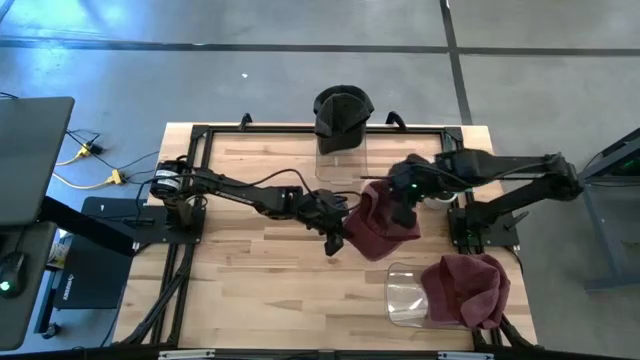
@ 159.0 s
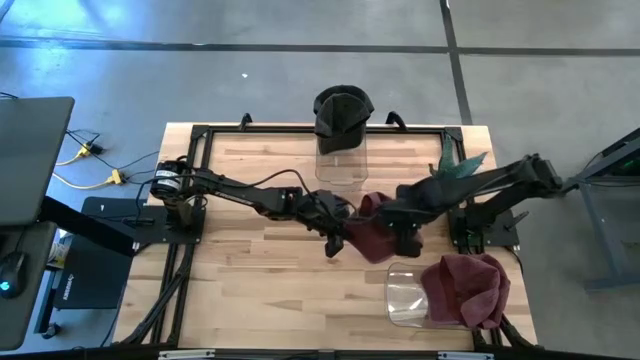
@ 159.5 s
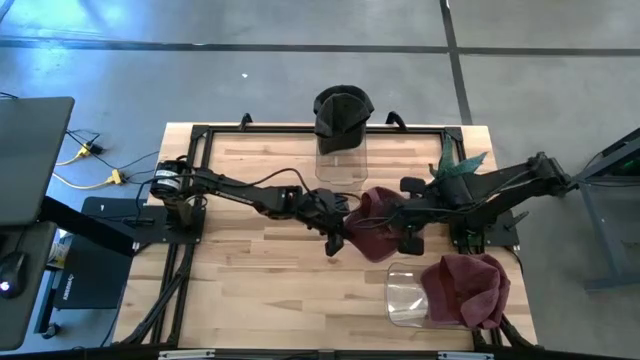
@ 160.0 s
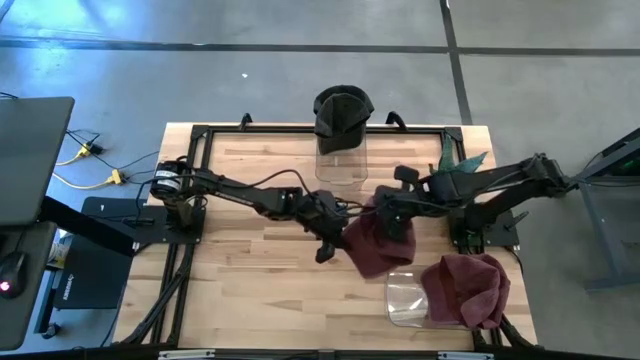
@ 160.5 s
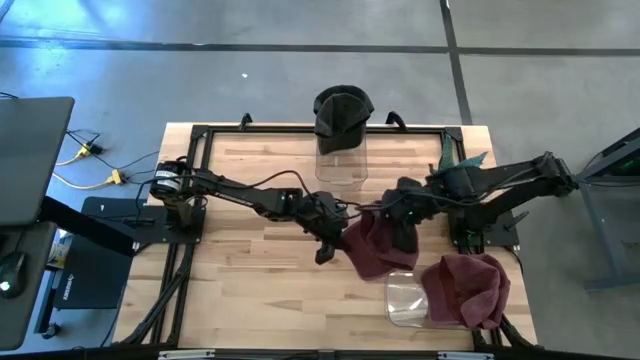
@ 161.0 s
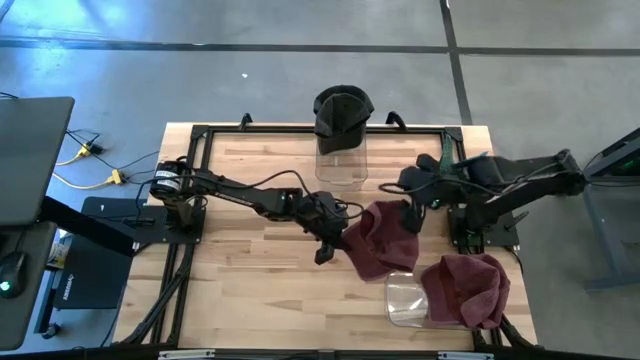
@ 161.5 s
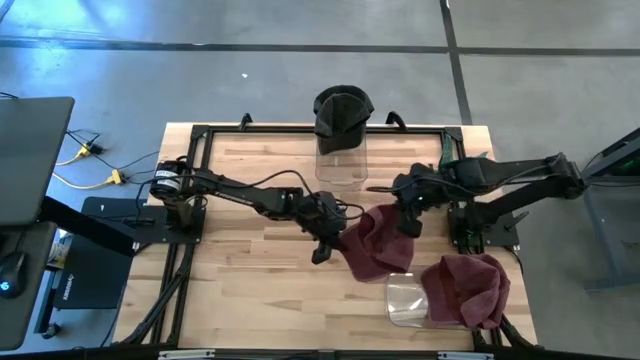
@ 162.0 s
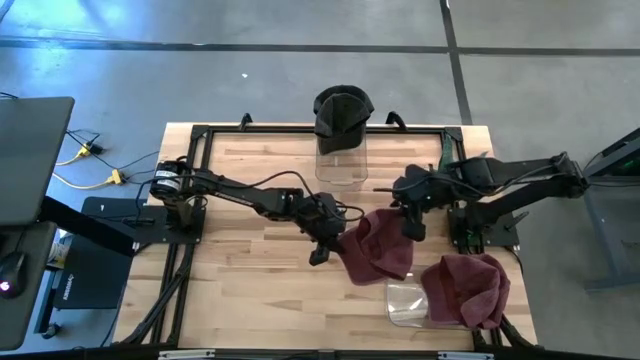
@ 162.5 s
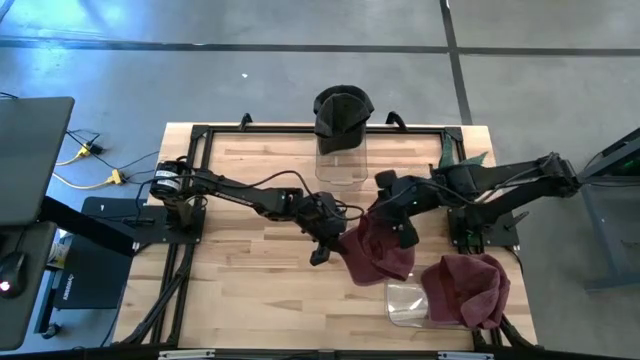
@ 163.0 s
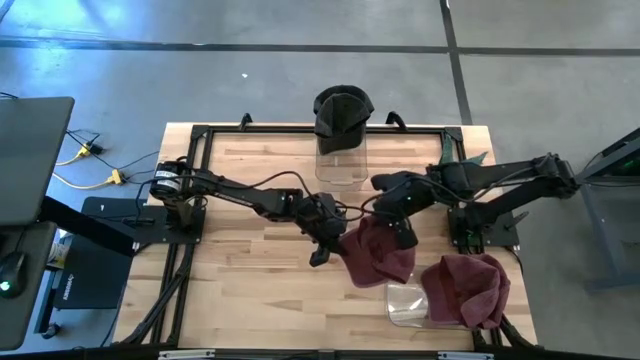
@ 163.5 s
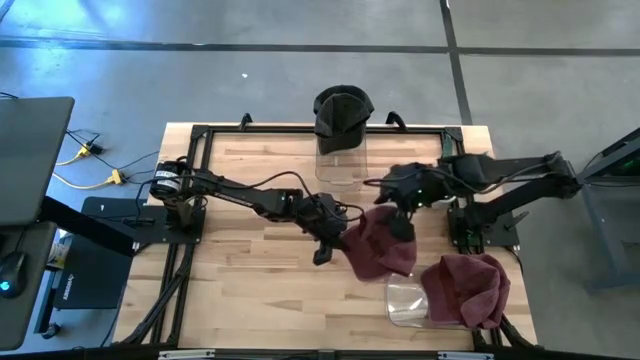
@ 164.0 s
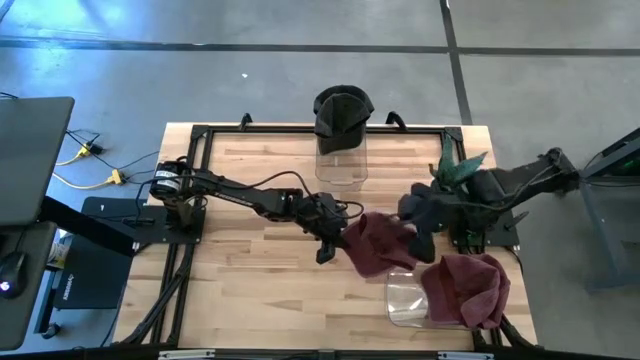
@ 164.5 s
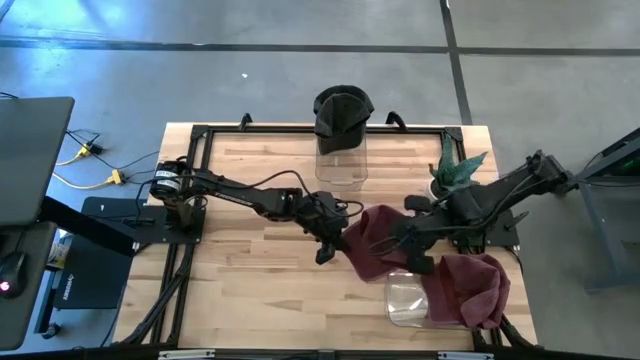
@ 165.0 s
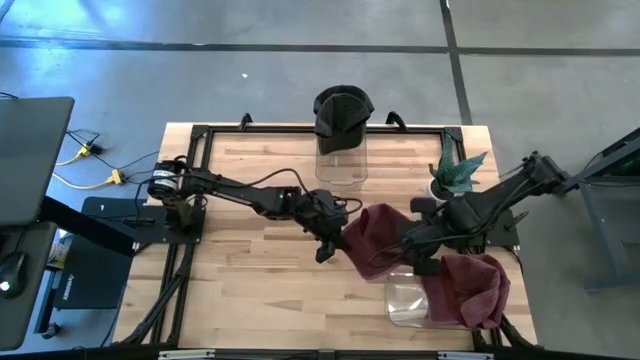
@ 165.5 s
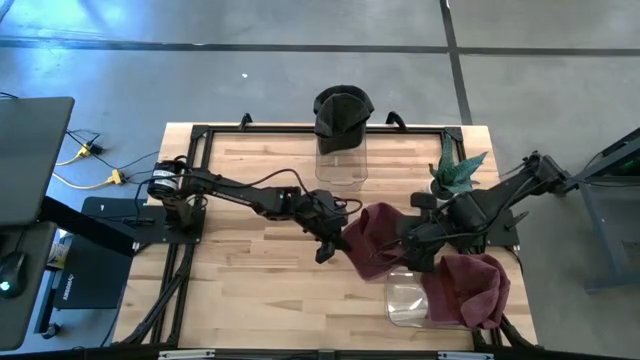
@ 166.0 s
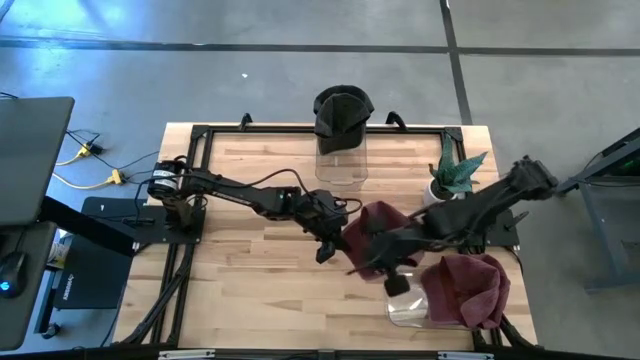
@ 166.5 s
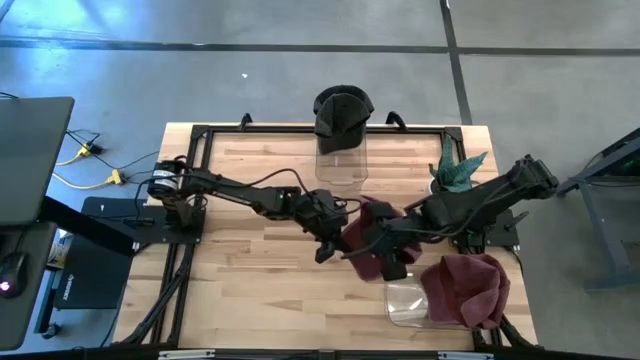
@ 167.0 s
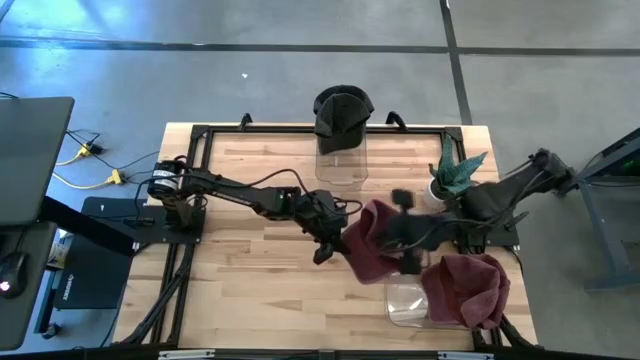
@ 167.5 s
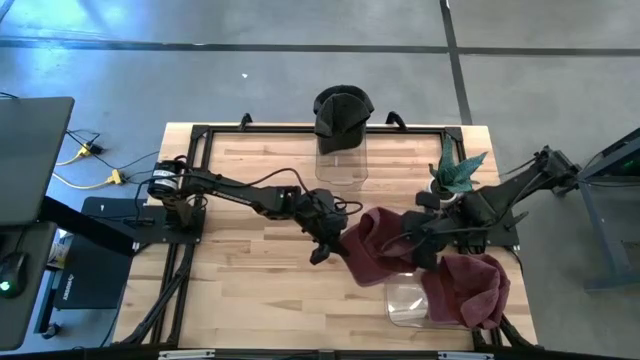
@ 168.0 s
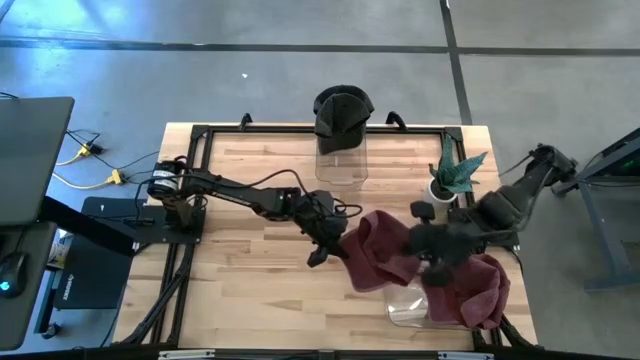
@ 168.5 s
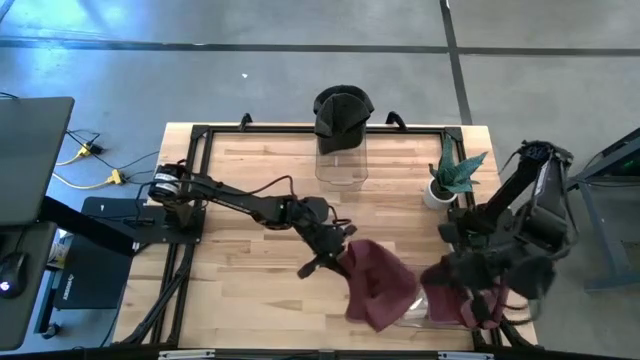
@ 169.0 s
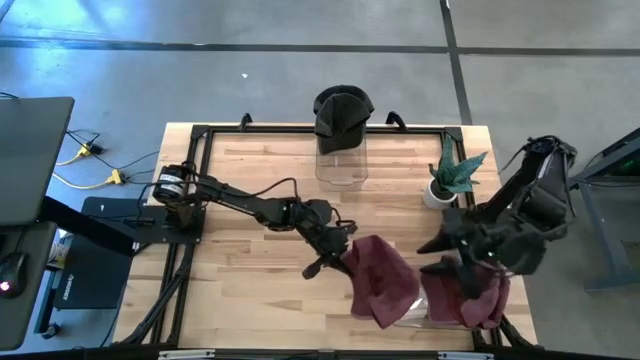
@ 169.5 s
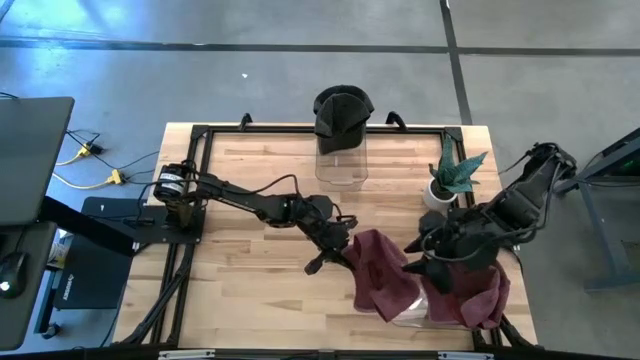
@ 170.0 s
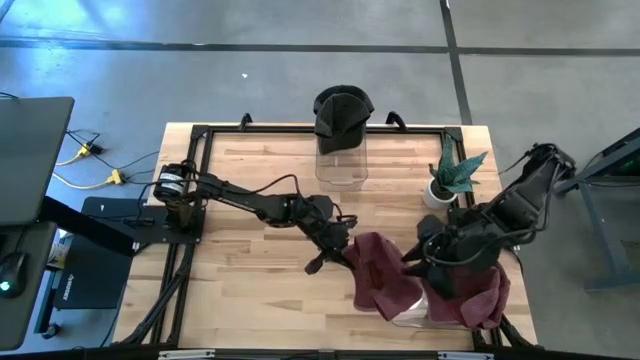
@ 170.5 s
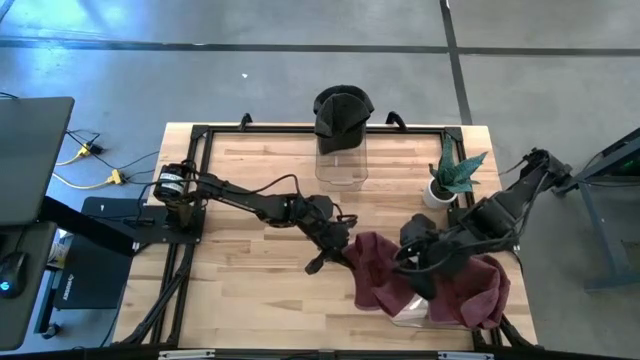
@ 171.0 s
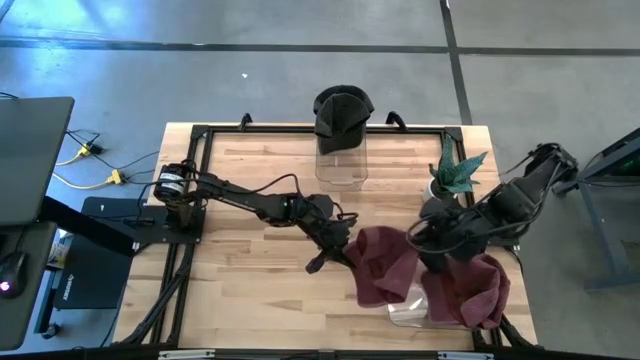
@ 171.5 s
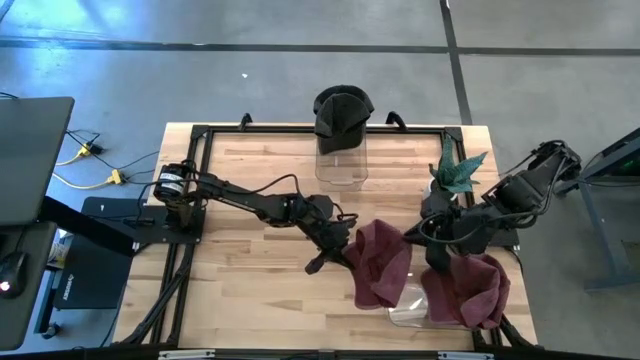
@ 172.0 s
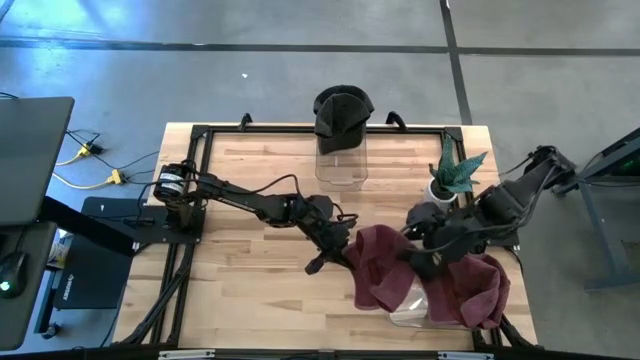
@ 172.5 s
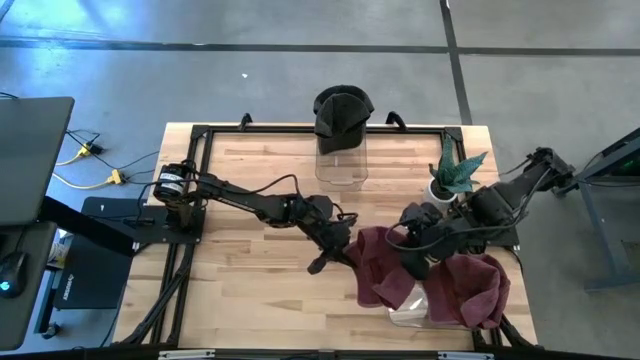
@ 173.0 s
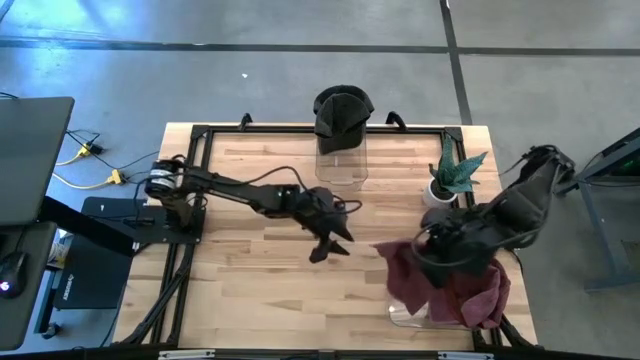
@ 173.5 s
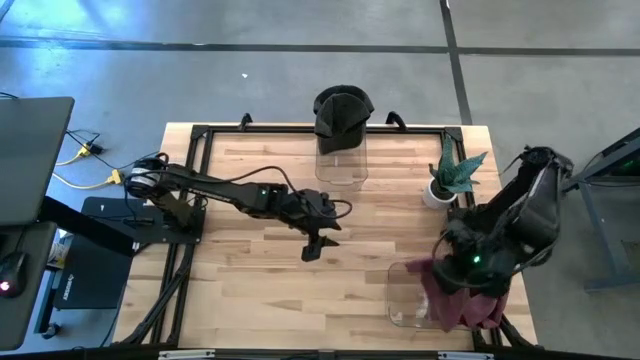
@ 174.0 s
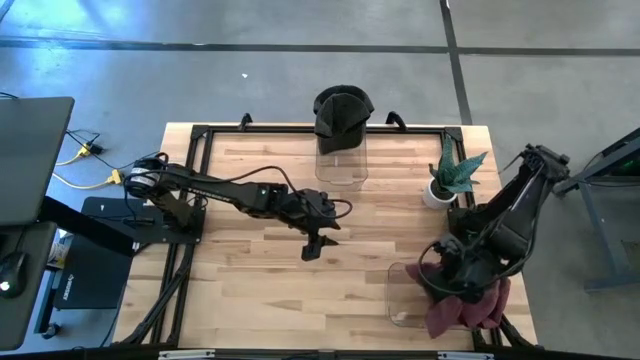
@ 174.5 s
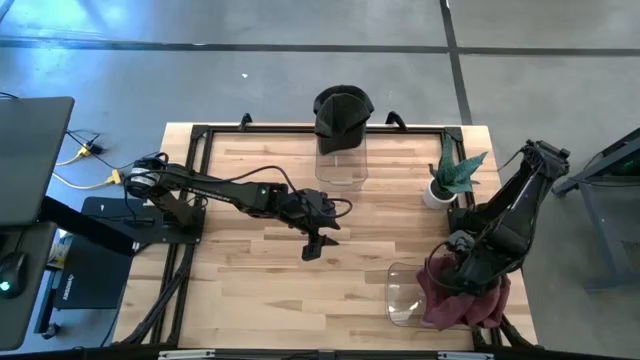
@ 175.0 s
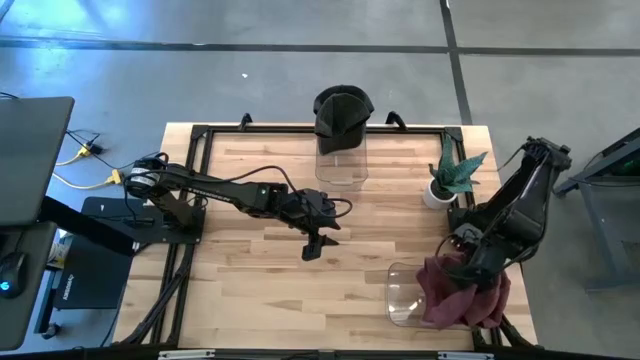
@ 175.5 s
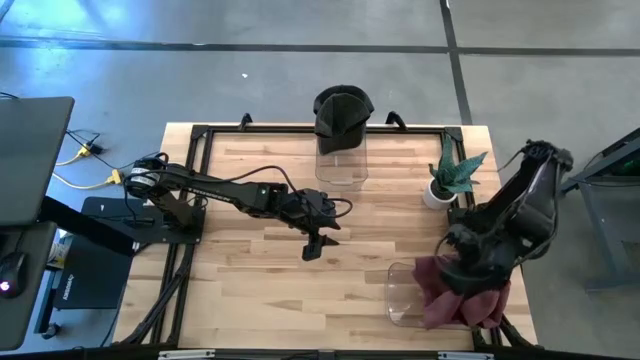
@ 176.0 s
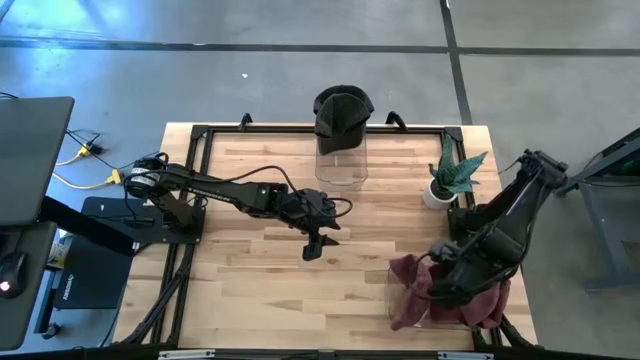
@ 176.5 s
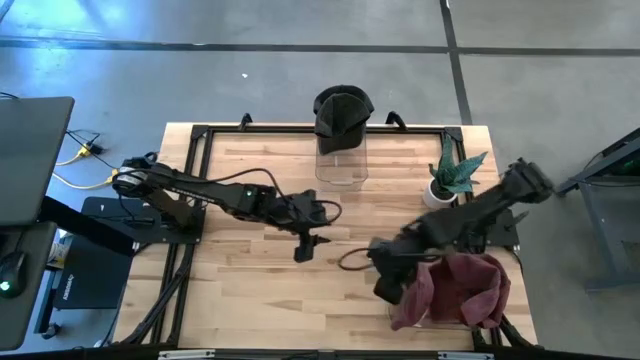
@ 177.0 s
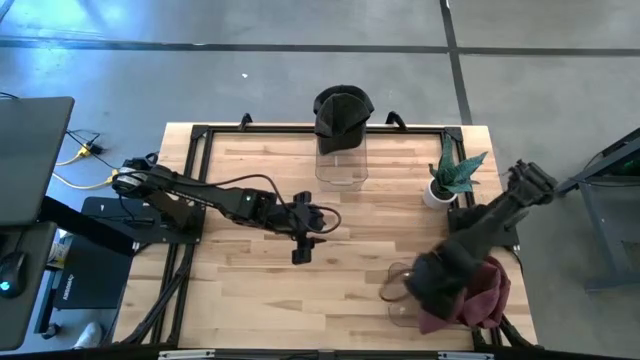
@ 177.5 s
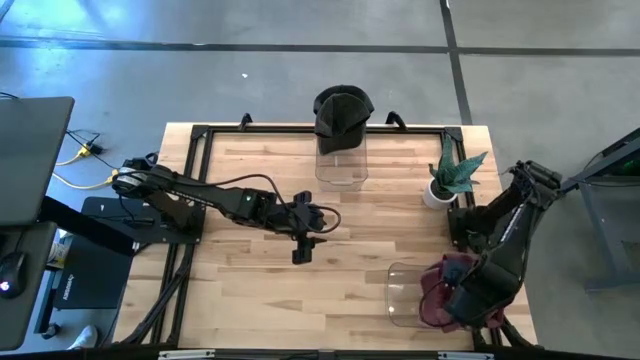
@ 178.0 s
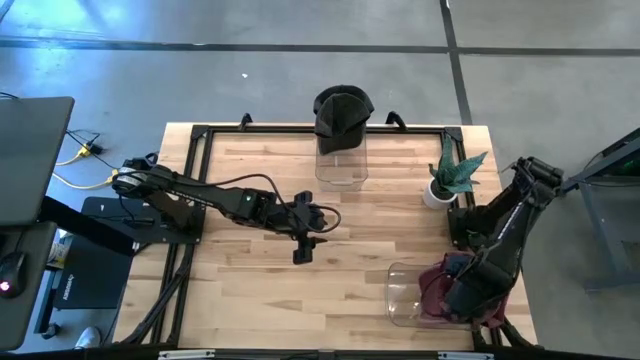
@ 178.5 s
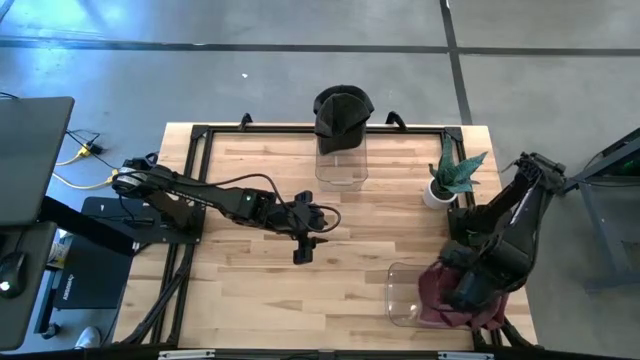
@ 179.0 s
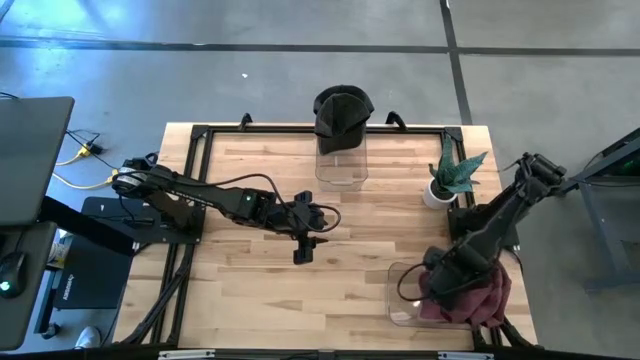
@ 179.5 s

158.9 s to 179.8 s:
Task: Pick & Place hat
Put the red cap into the bottom transparent bin

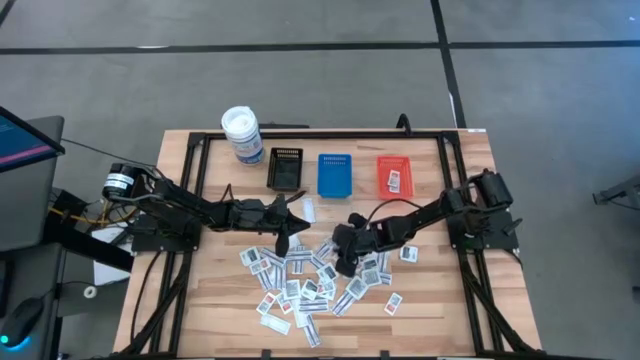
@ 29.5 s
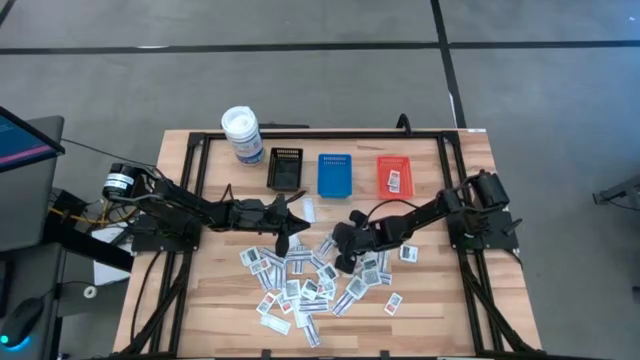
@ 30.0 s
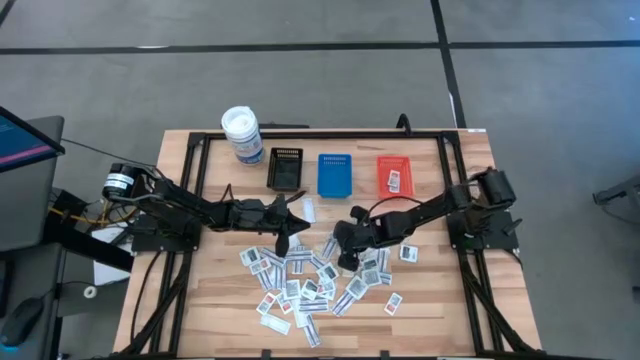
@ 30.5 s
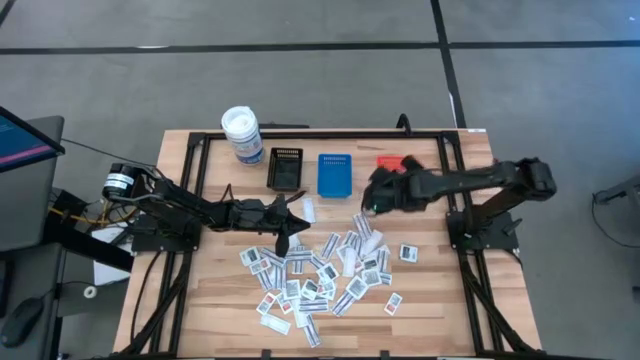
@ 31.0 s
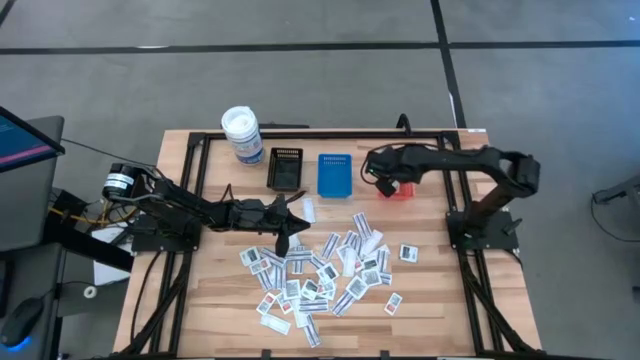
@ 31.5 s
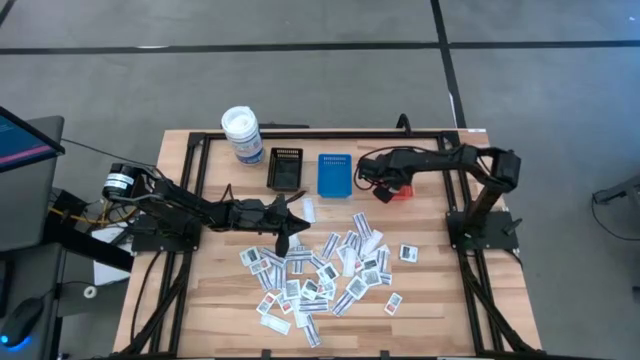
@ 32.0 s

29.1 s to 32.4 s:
Task: Pick & Place First Aid Supplies
Put the orange ointment pack into the orange bin
